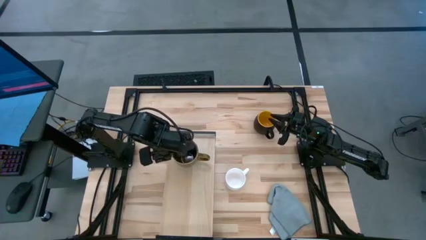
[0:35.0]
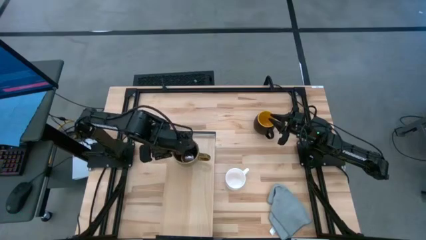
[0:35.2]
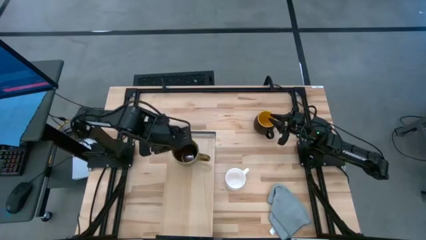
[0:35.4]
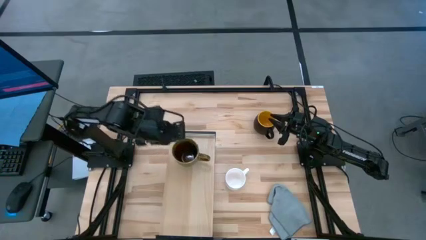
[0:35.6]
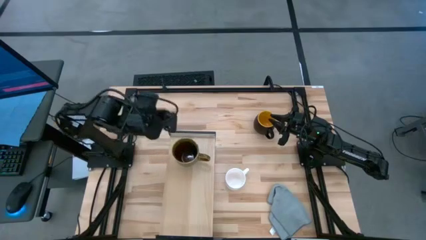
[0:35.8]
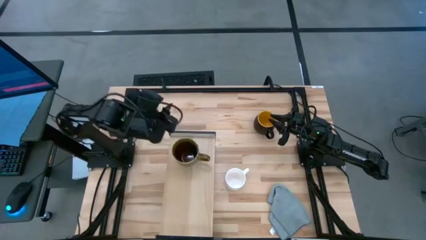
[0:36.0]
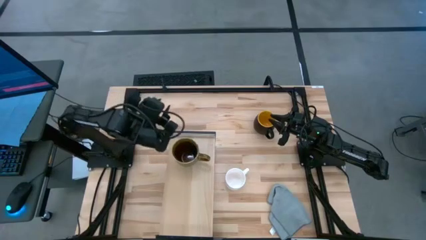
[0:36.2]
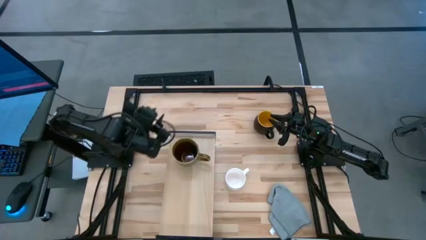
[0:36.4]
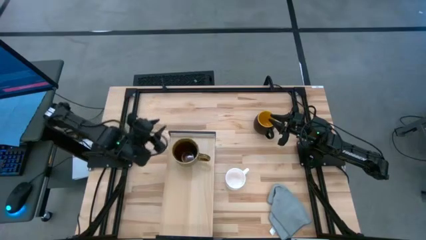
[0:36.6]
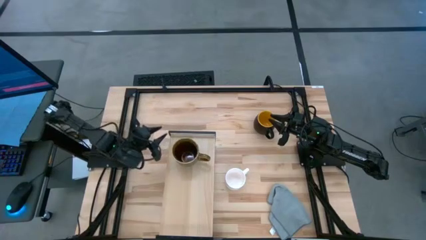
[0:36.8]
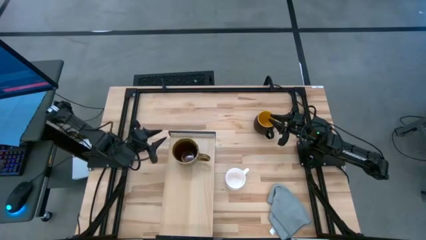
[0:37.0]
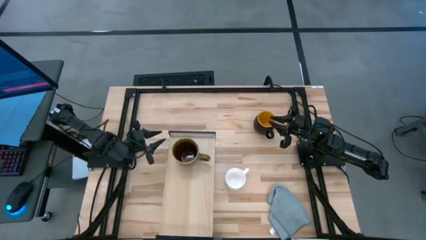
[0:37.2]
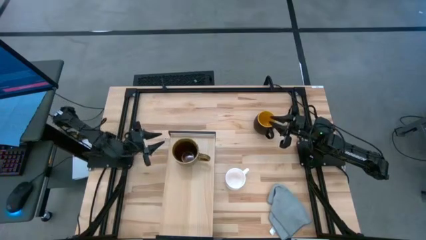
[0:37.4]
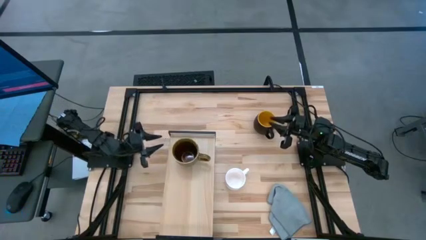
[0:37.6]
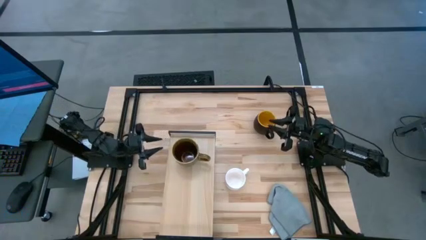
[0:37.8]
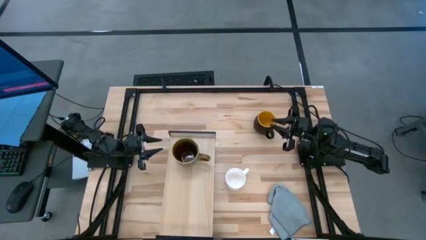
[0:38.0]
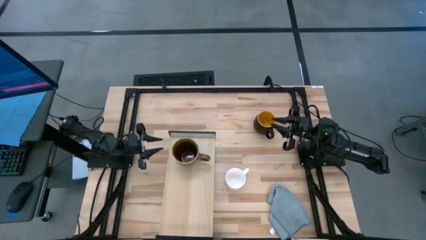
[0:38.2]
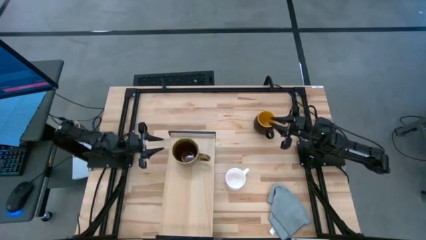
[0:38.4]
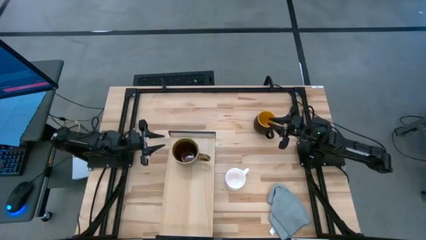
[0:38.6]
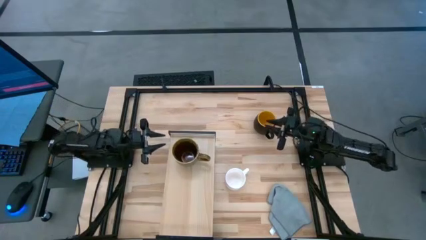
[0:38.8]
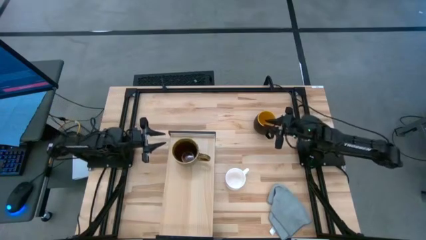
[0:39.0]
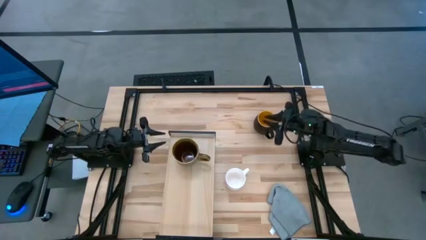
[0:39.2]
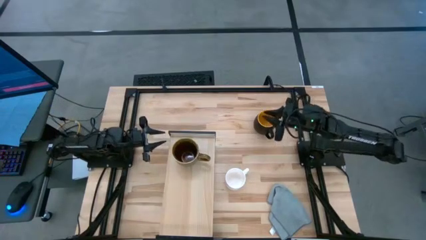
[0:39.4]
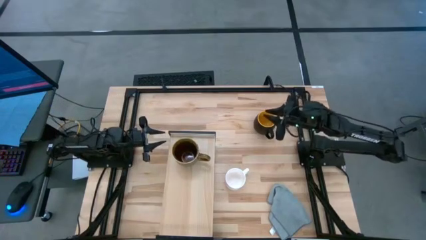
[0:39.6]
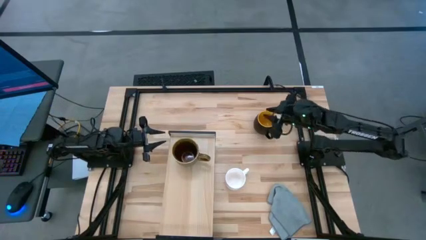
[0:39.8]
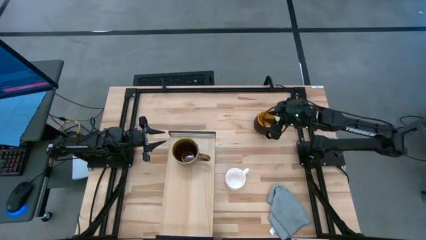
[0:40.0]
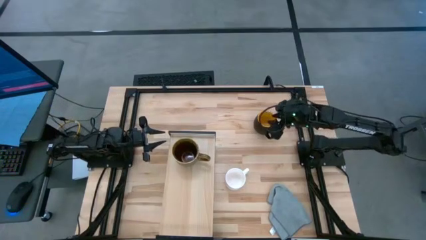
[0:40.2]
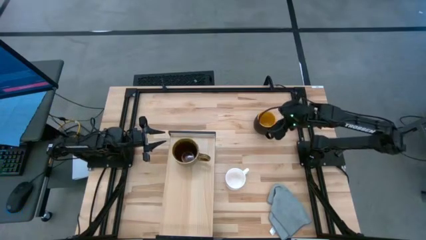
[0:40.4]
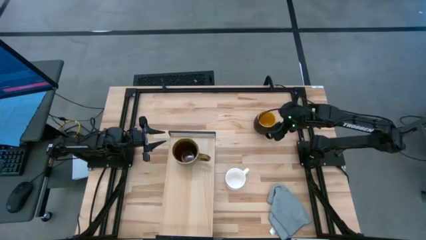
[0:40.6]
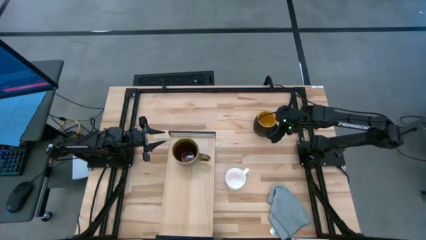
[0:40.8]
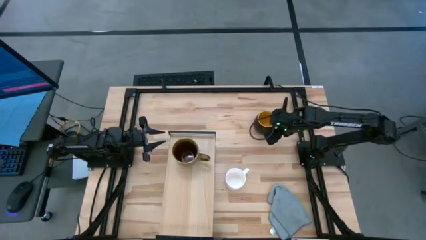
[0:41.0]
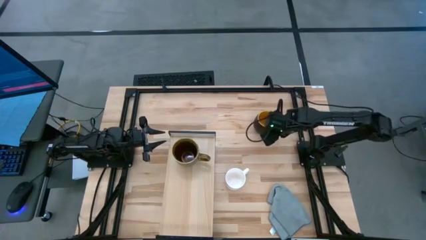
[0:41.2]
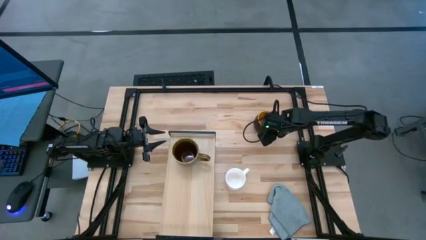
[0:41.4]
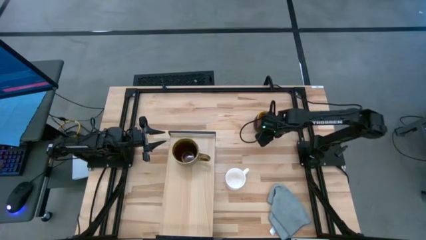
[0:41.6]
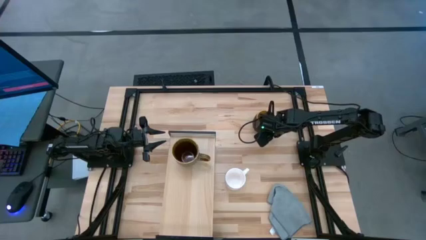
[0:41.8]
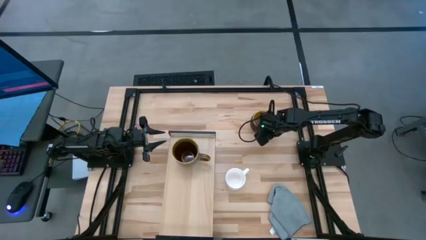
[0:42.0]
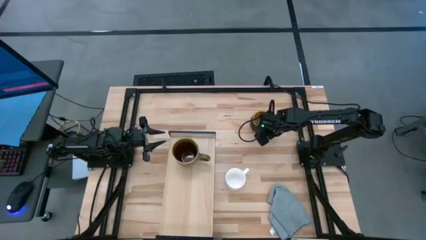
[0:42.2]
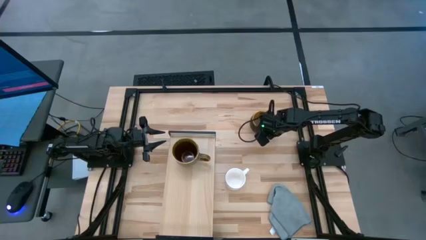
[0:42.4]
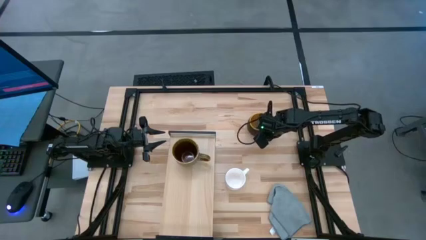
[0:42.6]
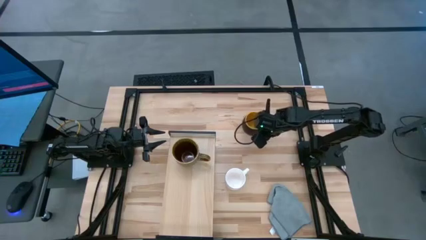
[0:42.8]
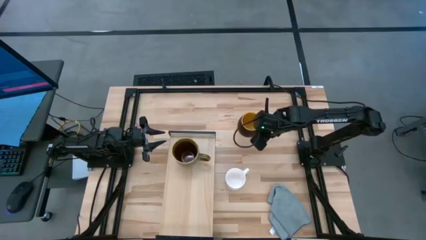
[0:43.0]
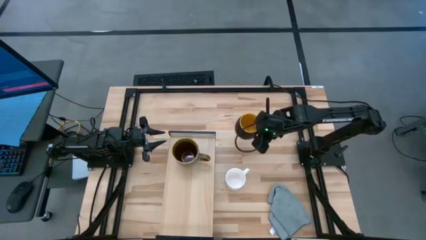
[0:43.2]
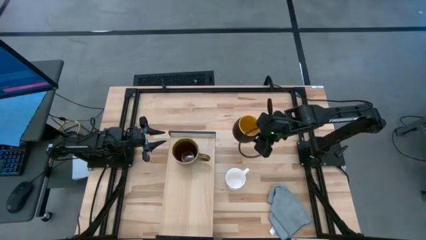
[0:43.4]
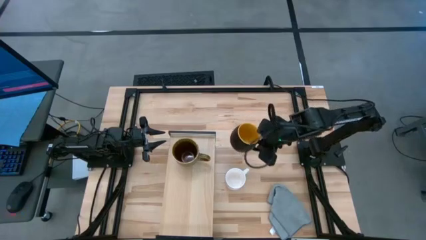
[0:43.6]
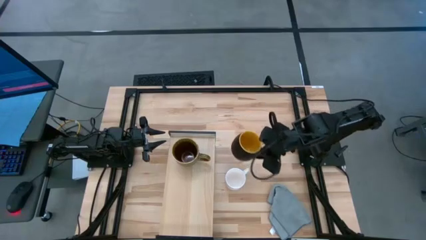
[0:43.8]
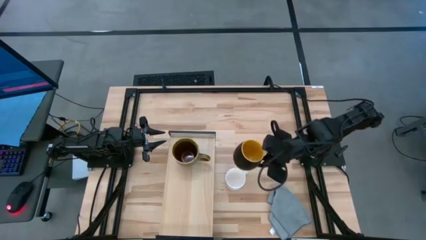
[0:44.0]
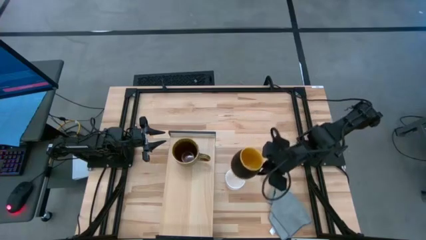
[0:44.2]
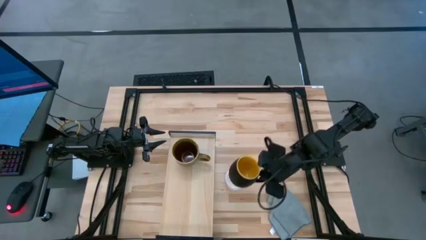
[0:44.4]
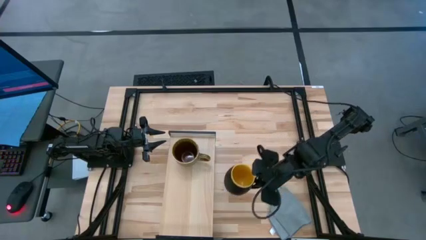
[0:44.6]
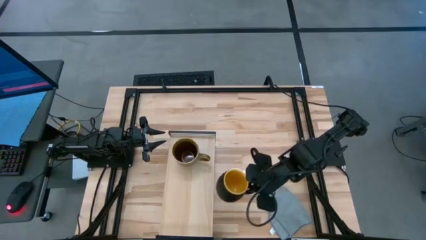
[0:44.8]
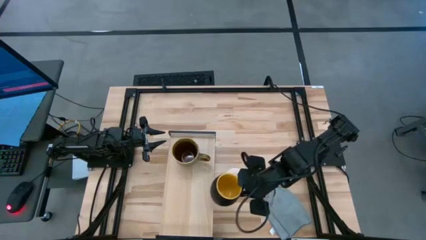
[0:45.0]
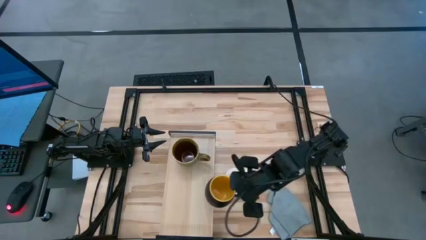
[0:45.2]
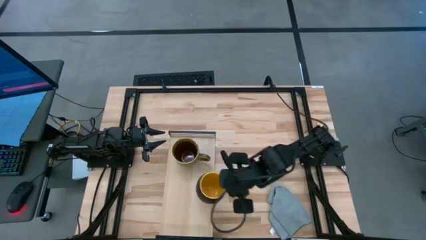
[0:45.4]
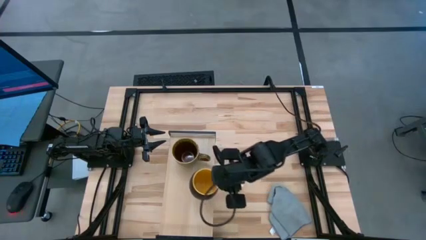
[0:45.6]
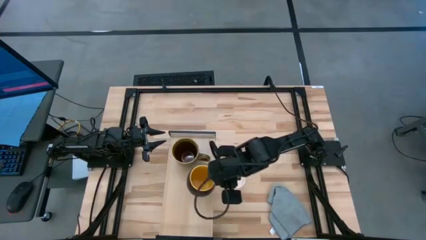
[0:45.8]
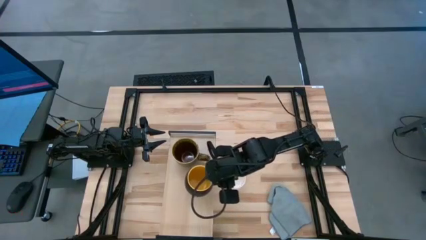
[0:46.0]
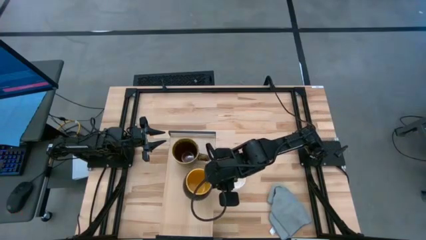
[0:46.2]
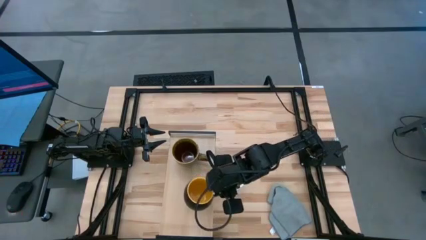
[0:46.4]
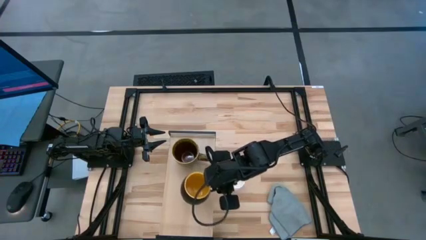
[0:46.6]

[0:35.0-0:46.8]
Task: Stack small to large cups/mugs on shelf
Put the black mug on the shelf

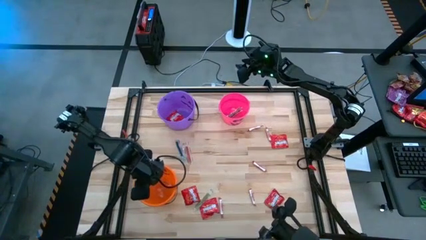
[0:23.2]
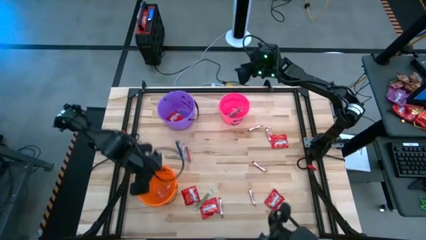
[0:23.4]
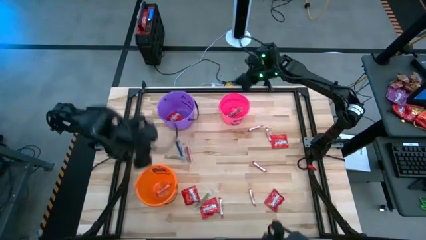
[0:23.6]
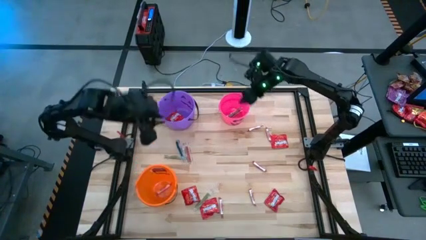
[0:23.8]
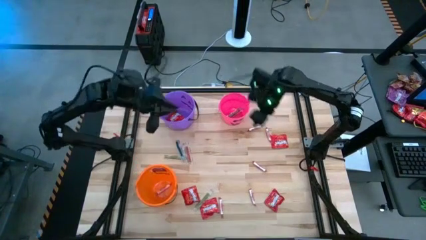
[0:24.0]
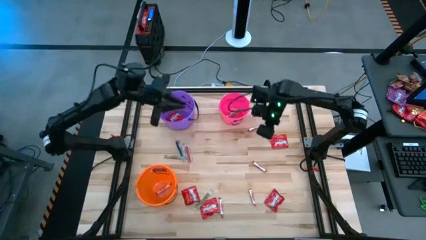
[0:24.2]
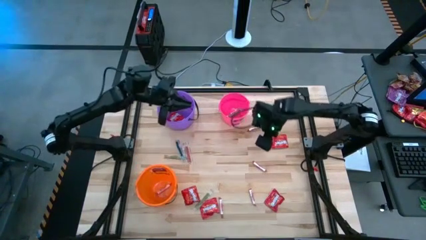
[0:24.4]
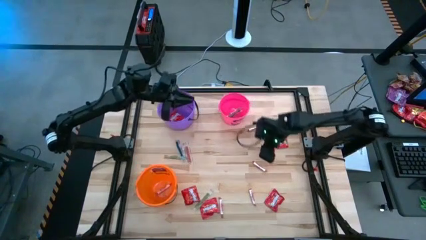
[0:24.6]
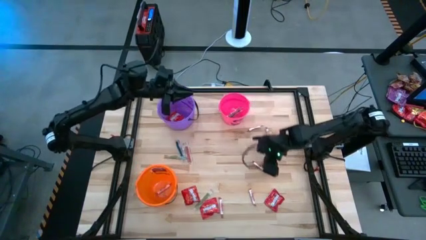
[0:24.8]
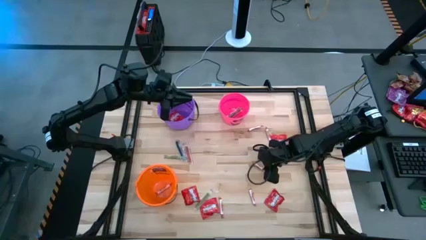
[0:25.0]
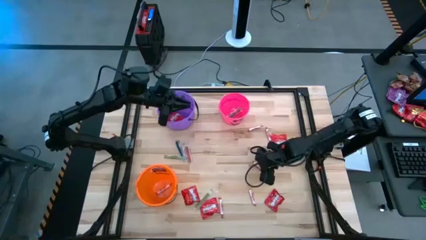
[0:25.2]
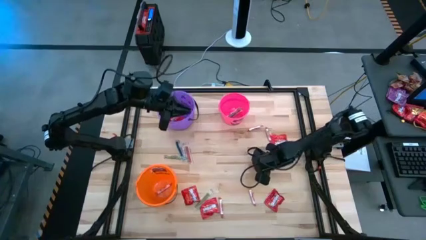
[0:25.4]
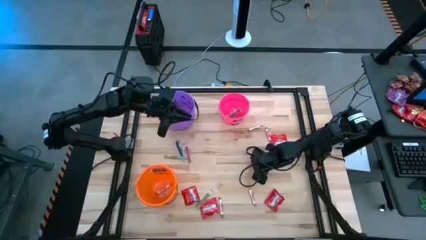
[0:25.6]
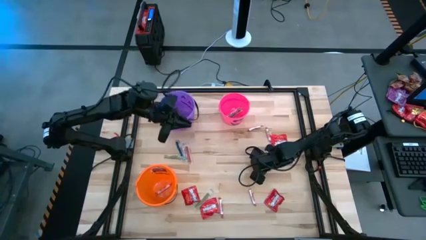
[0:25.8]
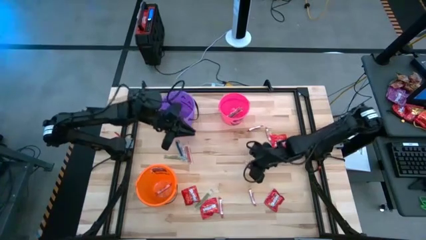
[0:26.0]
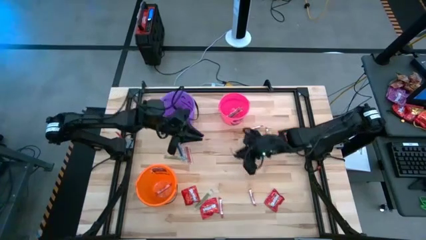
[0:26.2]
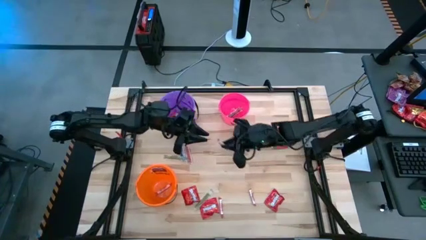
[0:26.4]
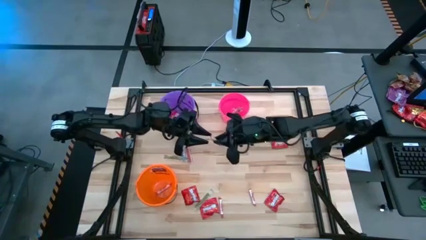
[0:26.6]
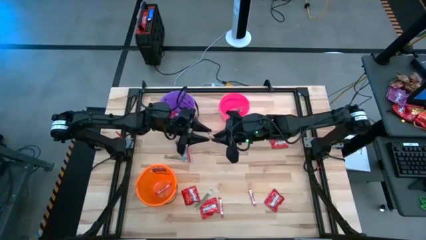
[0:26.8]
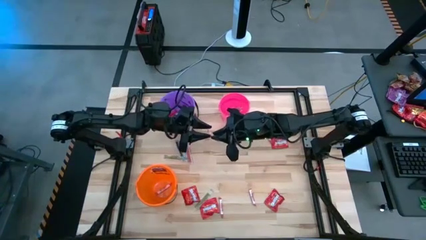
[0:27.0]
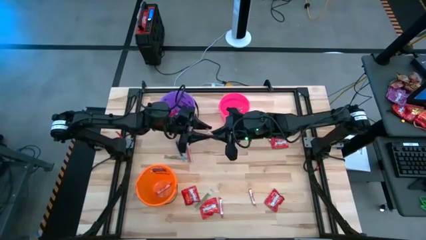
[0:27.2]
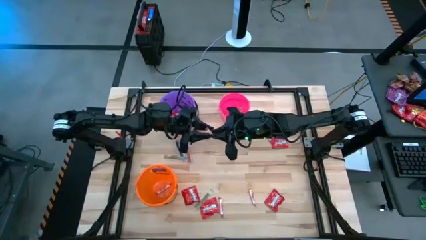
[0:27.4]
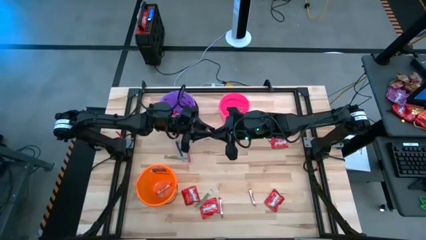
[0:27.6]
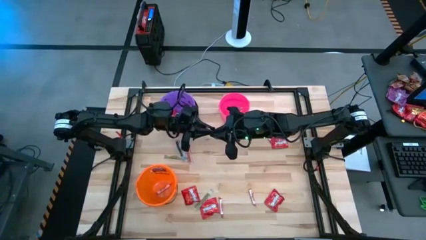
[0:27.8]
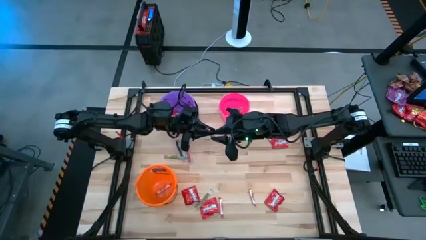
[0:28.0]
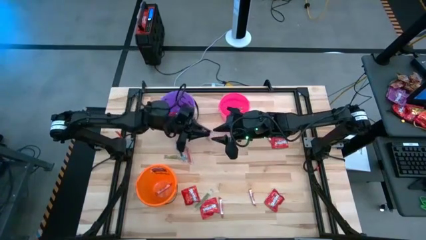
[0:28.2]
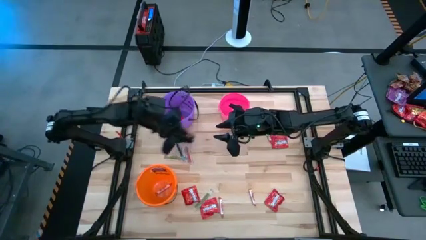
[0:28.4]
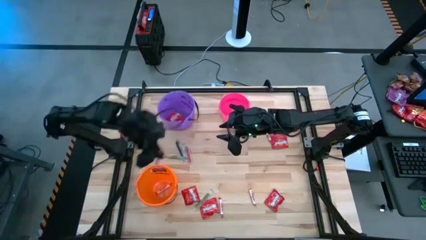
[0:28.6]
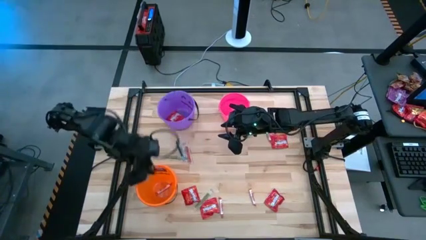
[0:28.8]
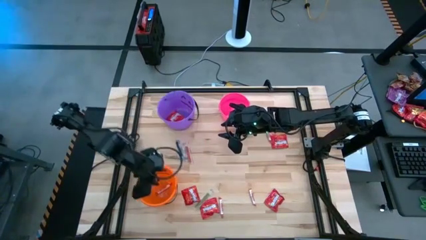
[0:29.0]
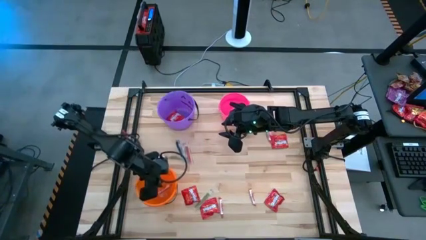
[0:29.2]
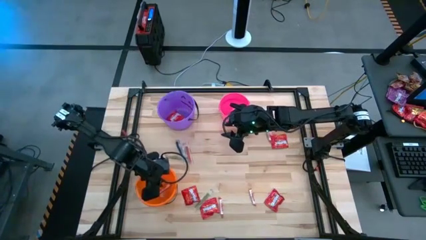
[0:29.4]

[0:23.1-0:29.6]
Task: Sort candy by brand, put in halloween buckets
Put the white candy into the orange bucket
